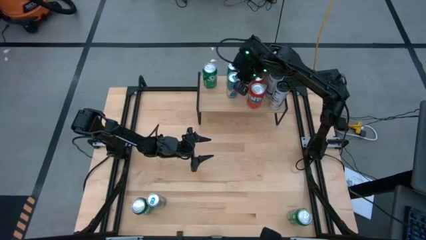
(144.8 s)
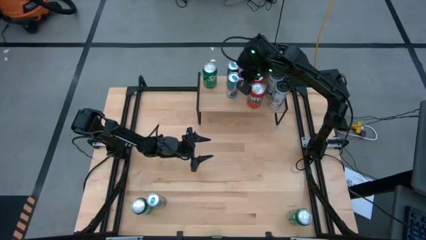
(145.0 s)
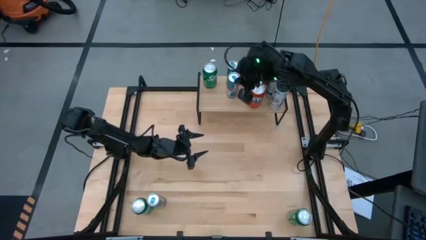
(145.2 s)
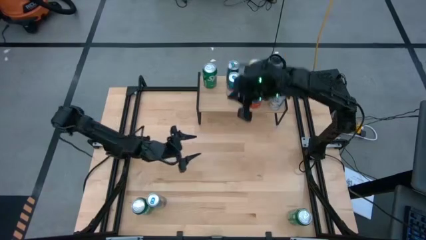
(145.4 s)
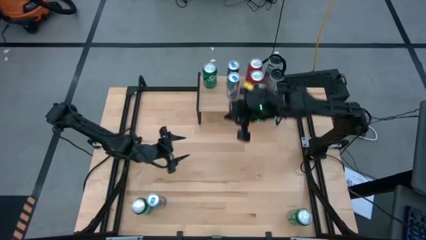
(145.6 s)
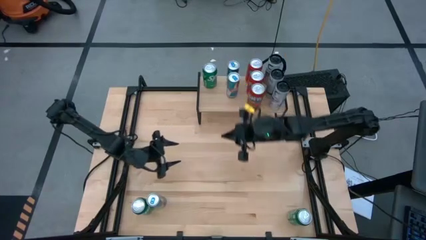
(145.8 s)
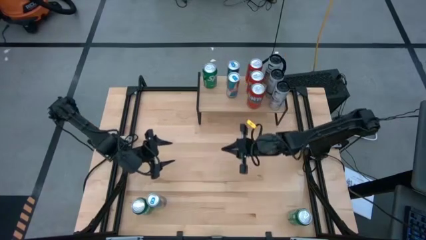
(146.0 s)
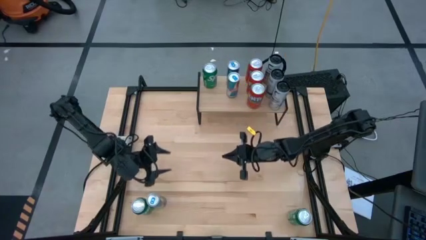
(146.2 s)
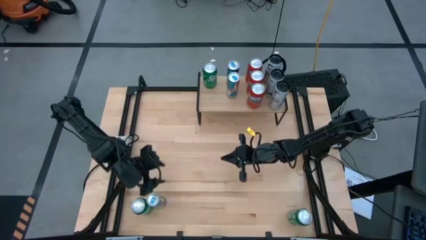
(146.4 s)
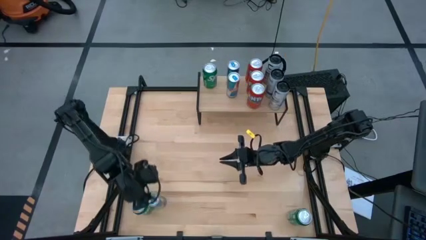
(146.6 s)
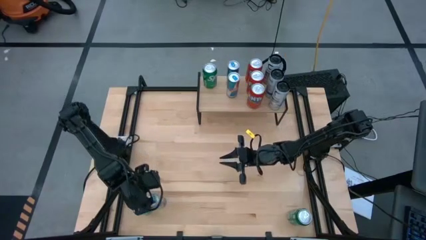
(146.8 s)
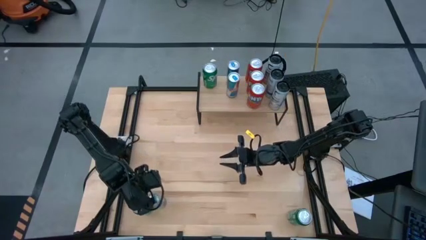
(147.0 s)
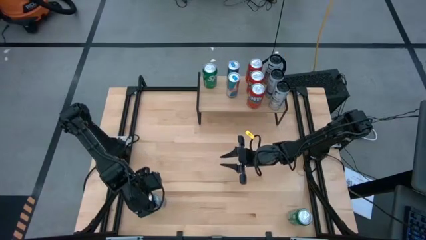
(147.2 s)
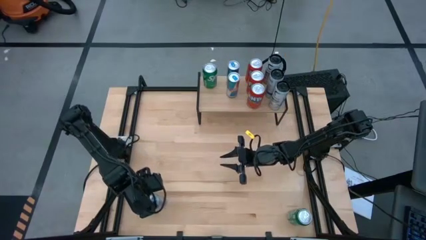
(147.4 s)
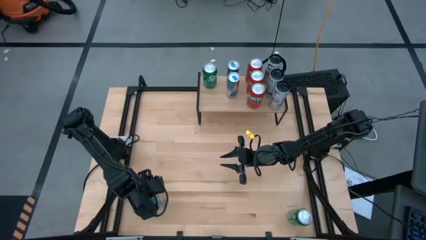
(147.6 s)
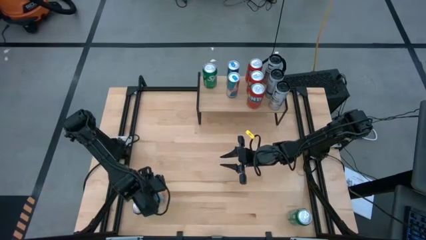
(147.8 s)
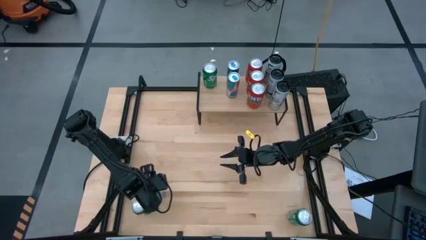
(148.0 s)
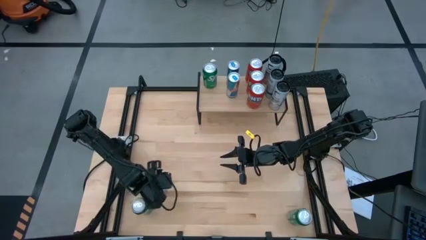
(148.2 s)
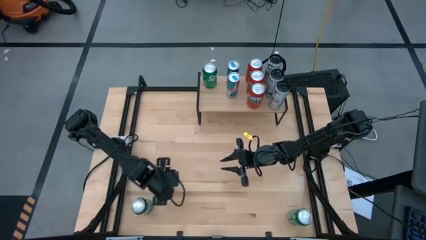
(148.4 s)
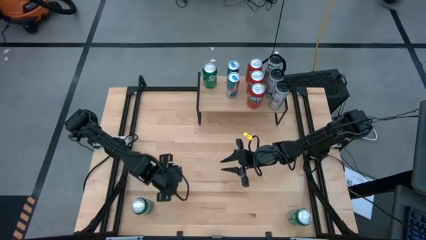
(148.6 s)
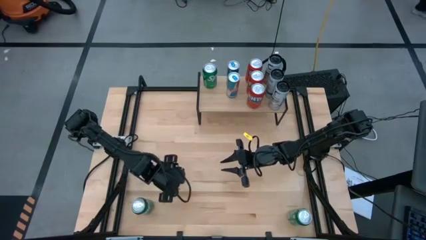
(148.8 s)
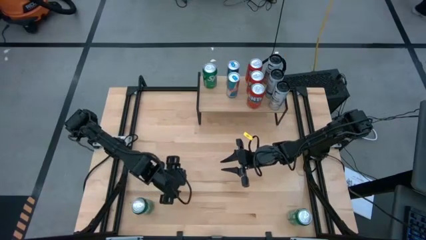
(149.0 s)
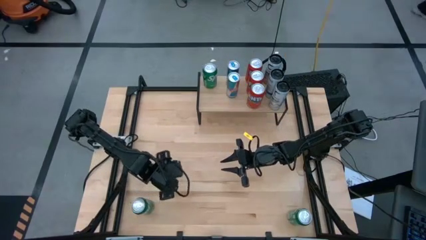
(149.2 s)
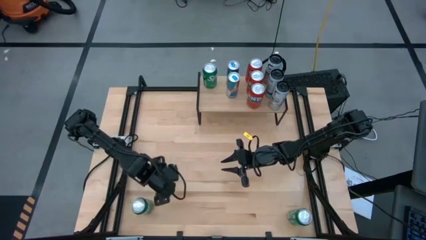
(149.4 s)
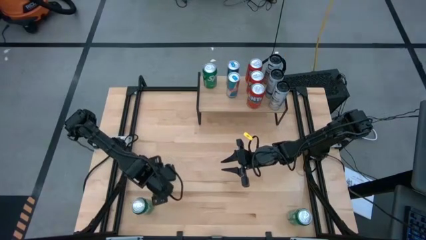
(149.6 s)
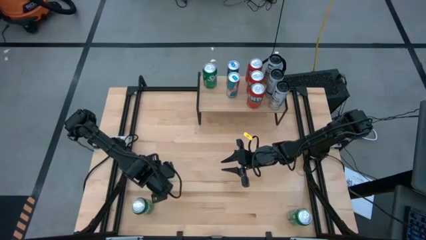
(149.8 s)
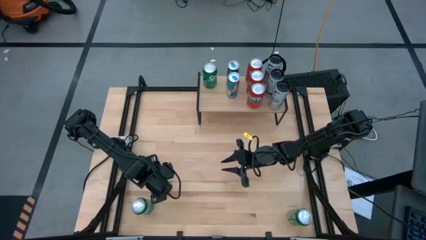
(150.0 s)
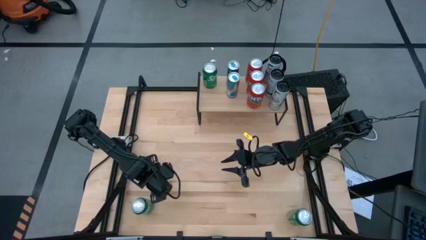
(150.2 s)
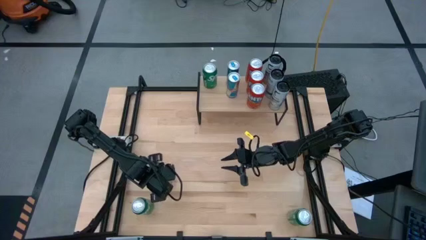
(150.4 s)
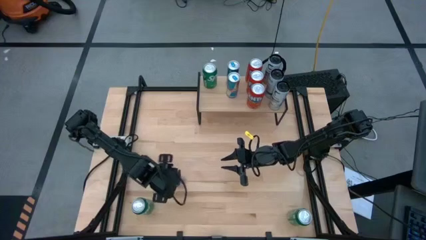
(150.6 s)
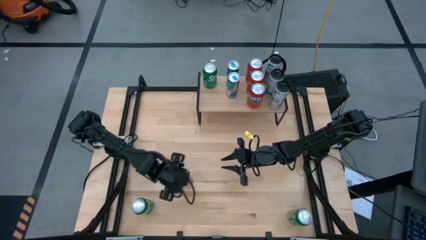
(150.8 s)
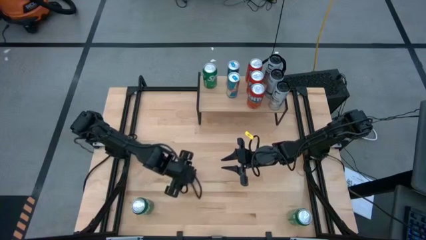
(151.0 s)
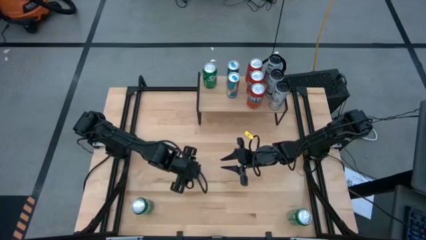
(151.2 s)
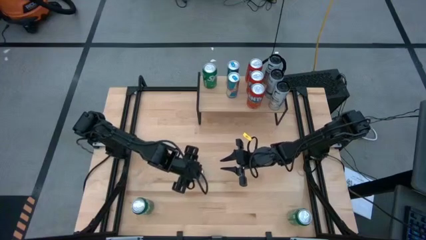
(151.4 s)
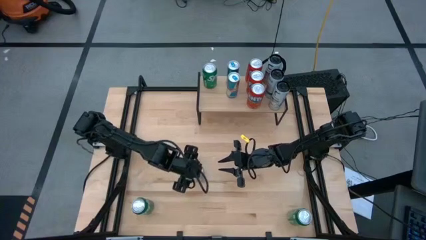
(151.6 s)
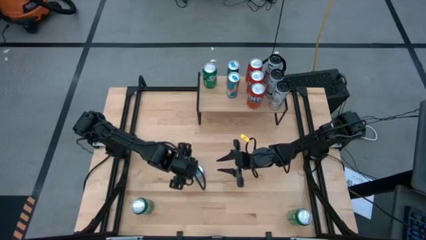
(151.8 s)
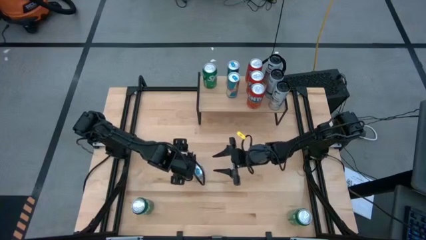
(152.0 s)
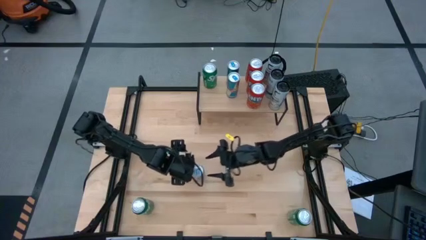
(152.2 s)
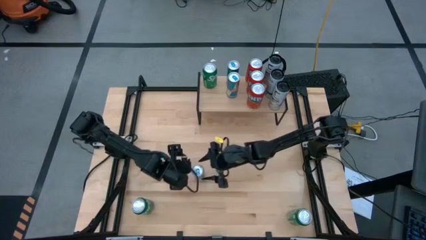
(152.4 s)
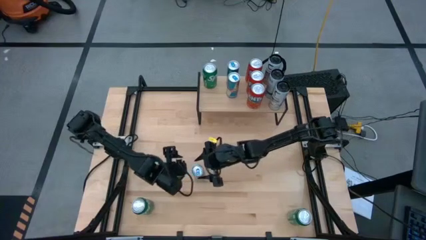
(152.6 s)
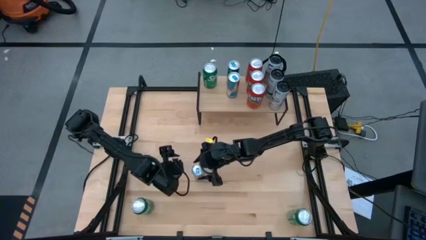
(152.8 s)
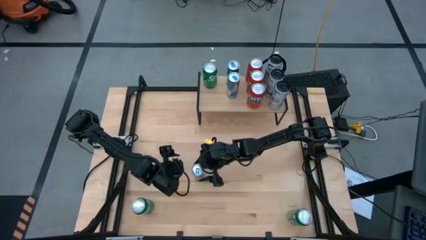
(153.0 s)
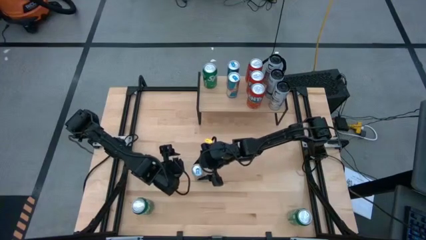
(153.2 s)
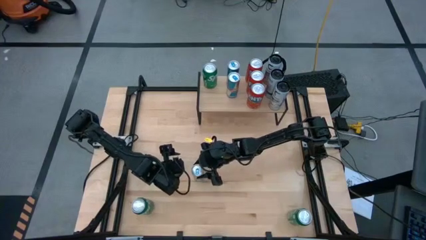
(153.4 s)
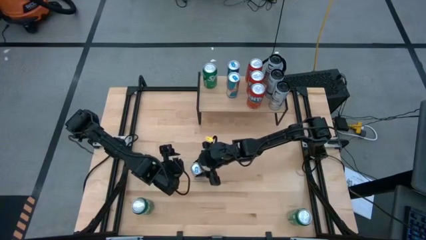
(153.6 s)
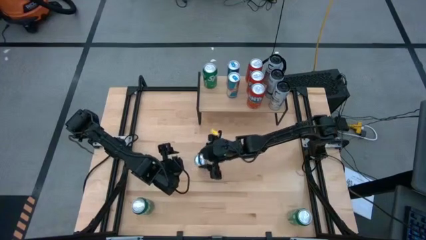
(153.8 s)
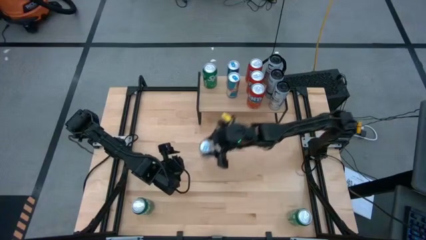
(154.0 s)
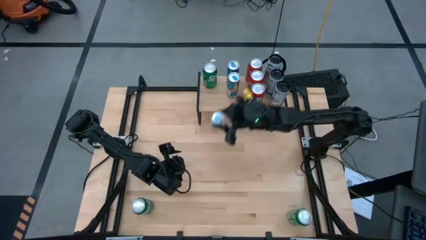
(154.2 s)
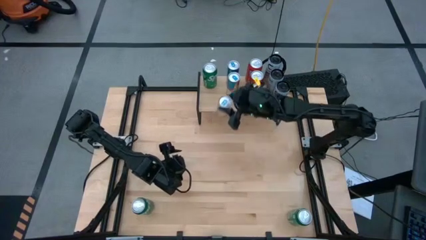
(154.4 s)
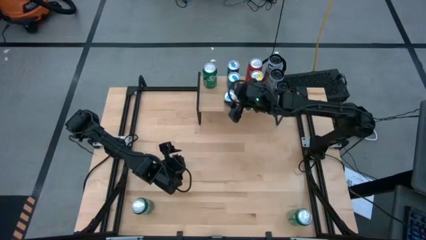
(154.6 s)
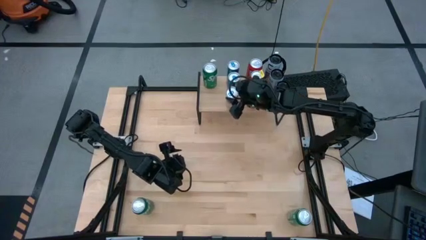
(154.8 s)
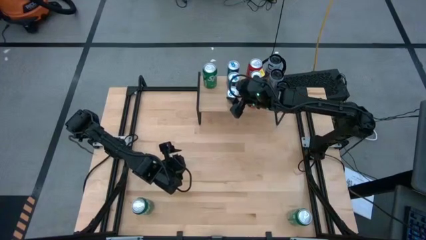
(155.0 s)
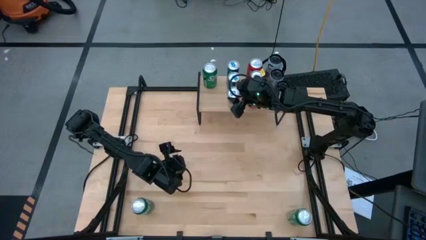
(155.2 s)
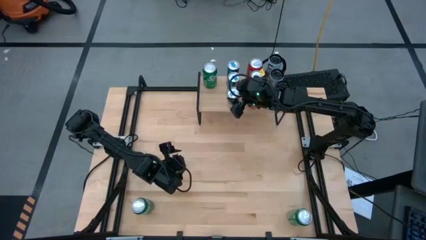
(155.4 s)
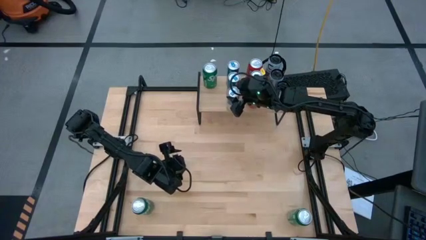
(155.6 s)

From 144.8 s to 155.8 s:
Task: Place canned beverage on shelf
Put the blue soda can on the shelf aligned with the other blue soda cans

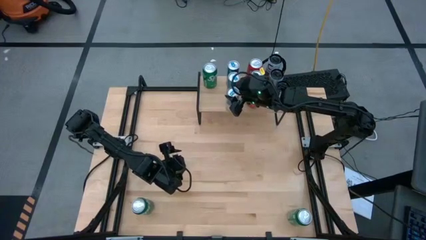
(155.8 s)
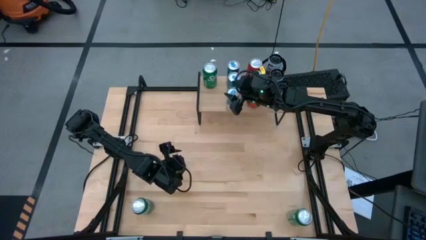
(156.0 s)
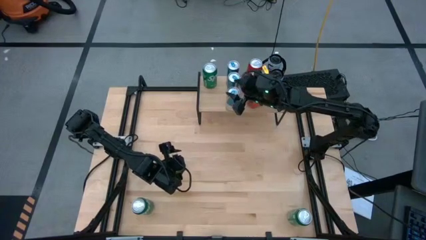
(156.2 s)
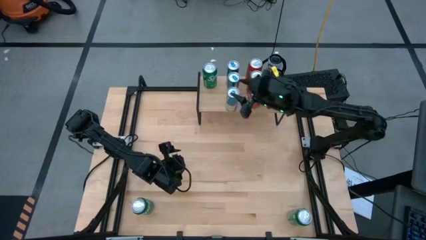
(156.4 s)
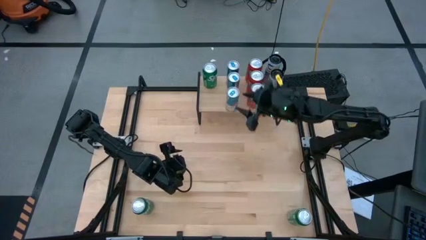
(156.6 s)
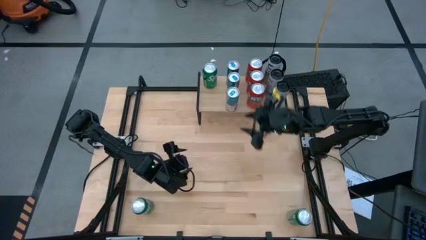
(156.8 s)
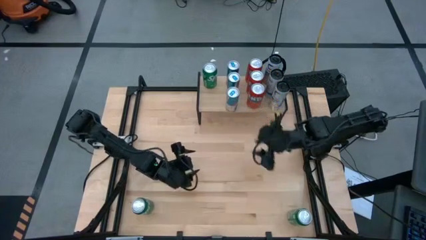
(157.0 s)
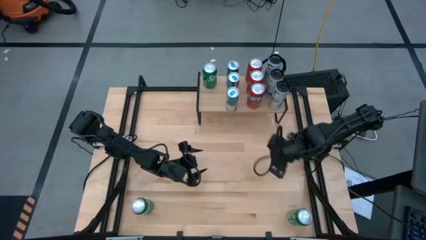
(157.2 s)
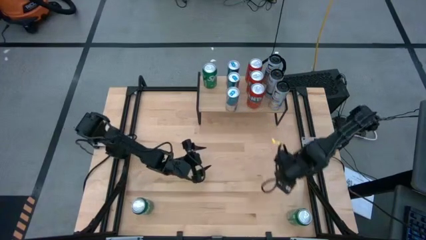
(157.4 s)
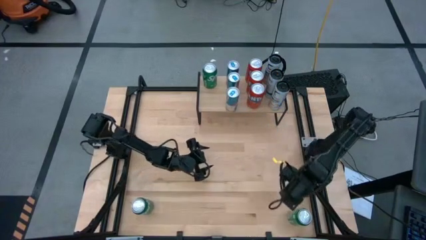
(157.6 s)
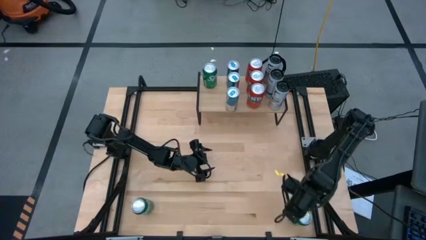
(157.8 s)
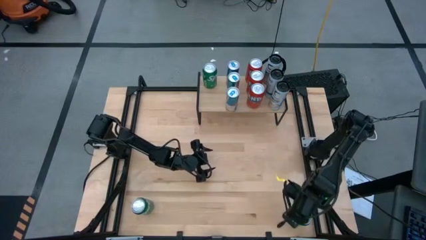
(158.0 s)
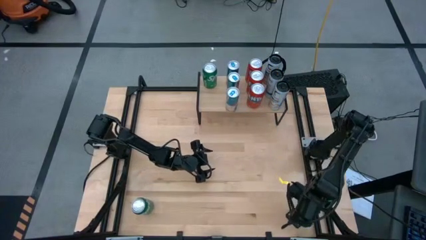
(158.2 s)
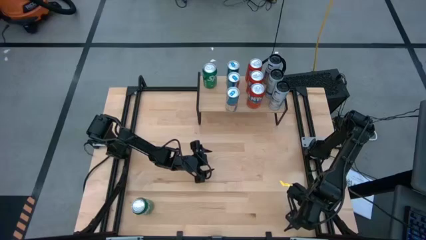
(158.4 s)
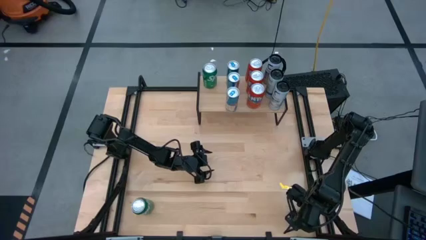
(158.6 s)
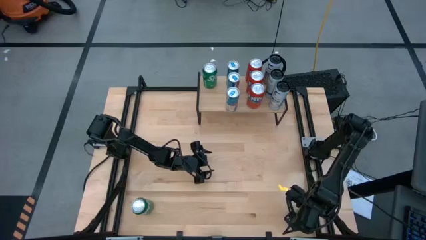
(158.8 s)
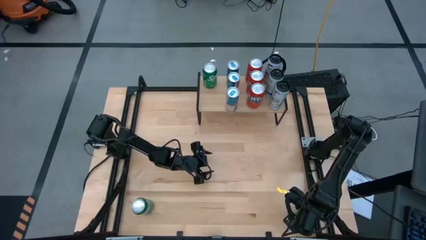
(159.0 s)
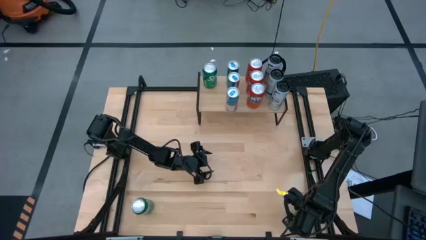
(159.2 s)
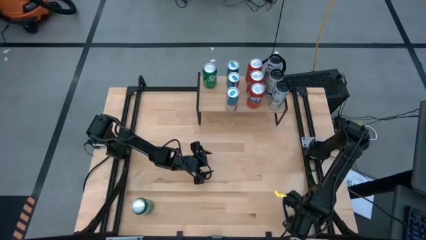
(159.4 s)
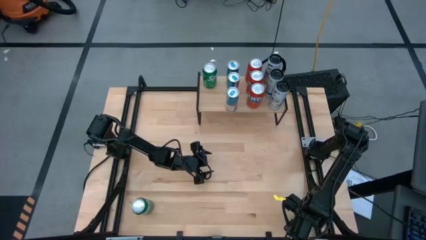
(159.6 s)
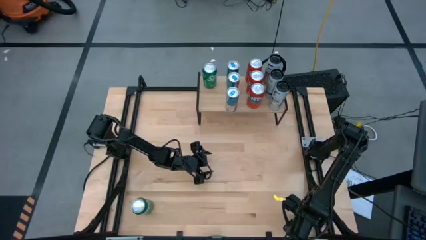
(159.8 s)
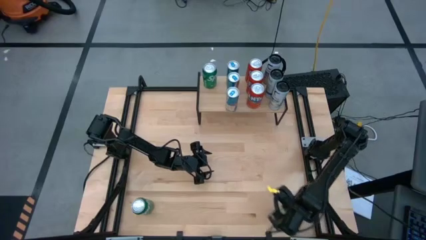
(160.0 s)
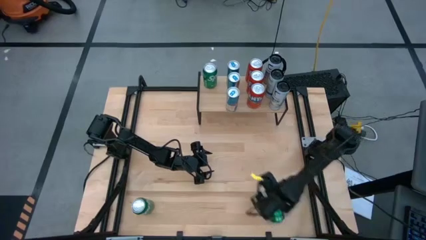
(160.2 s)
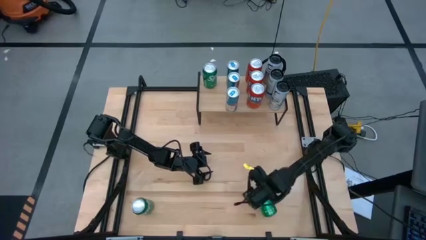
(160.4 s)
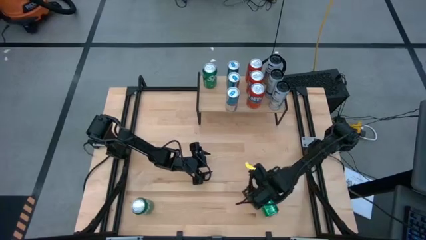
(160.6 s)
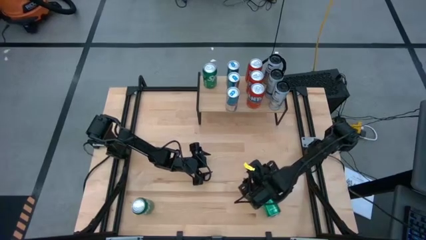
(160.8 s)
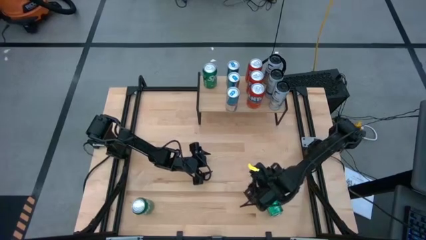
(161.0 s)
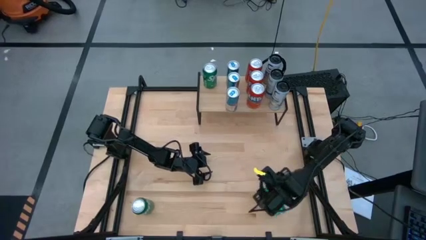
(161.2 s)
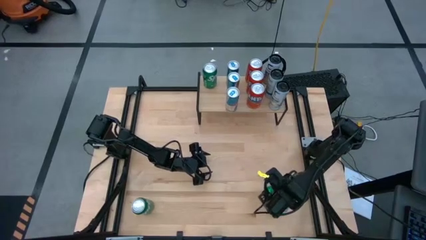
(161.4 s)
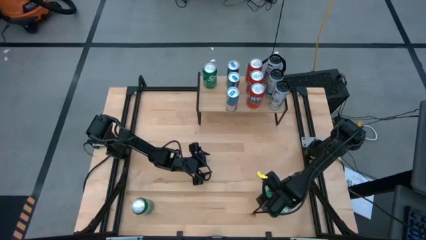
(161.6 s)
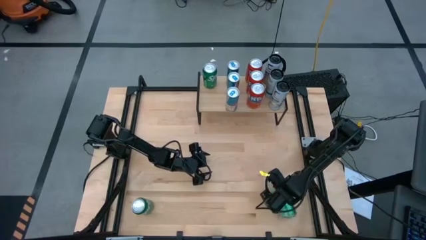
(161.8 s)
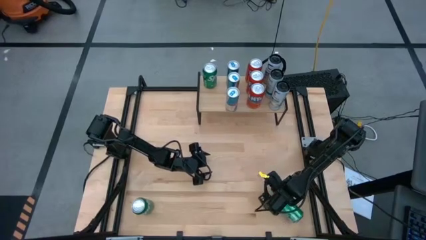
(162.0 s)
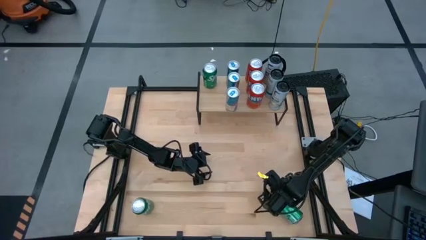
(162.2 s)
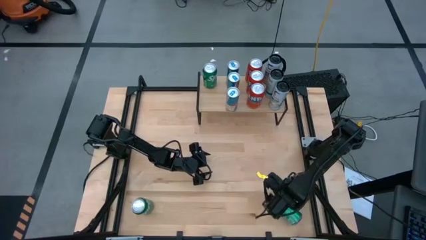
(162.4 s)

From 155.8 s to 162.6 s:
Put the right green soda can on the shelf aligned with the other green soda can
